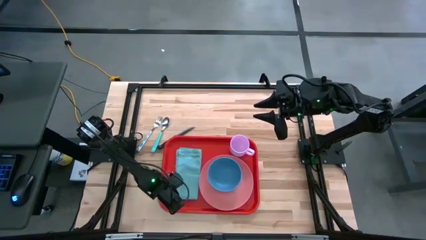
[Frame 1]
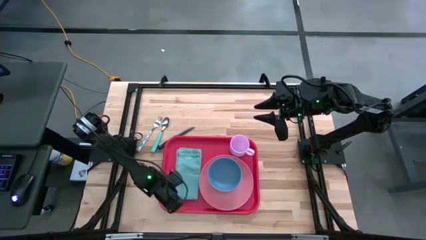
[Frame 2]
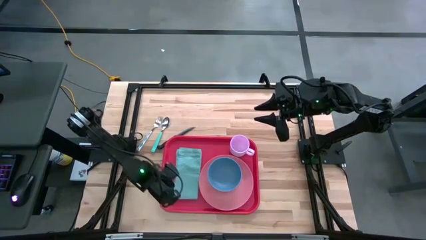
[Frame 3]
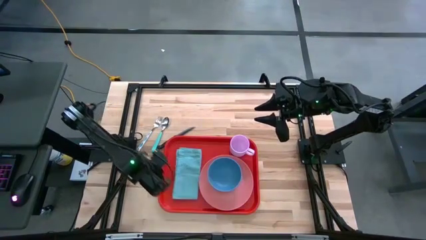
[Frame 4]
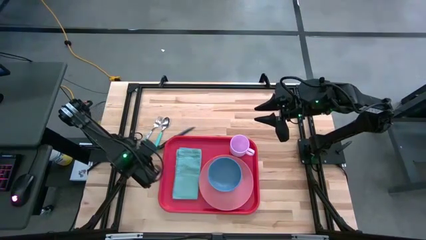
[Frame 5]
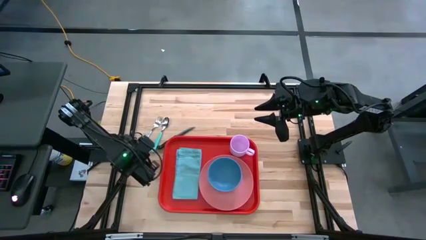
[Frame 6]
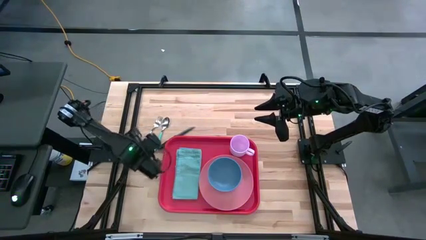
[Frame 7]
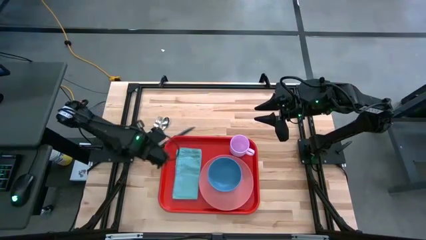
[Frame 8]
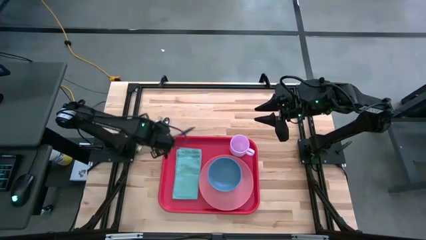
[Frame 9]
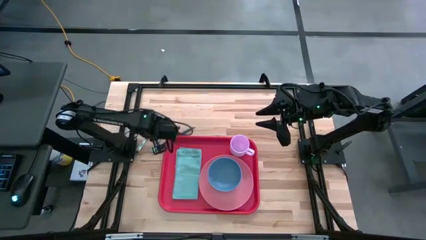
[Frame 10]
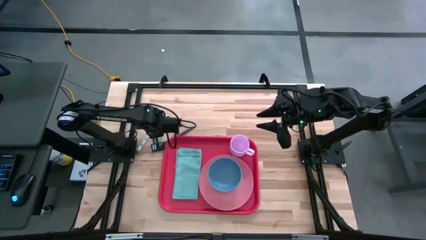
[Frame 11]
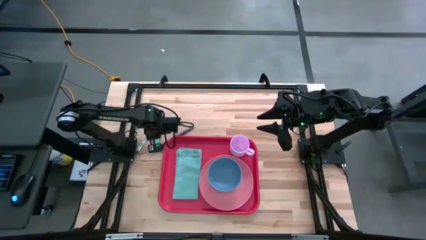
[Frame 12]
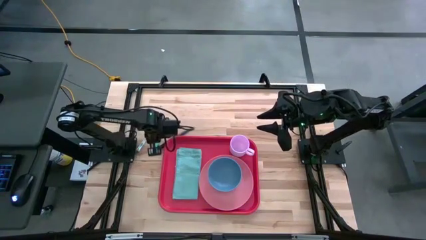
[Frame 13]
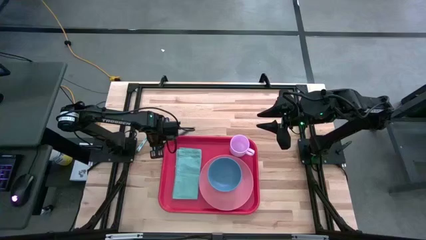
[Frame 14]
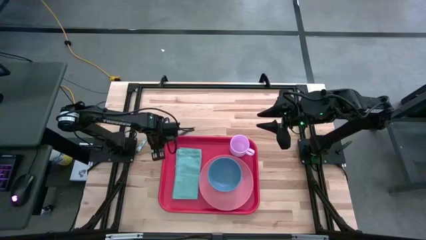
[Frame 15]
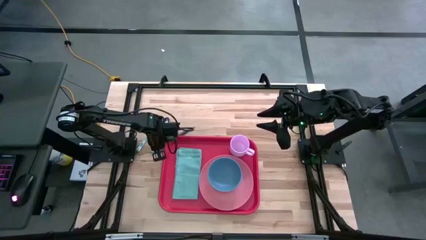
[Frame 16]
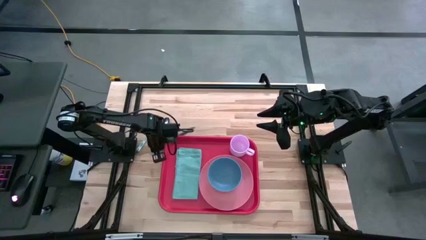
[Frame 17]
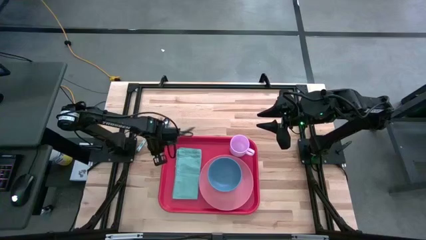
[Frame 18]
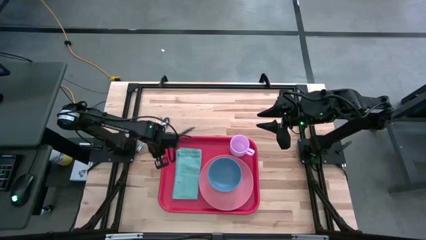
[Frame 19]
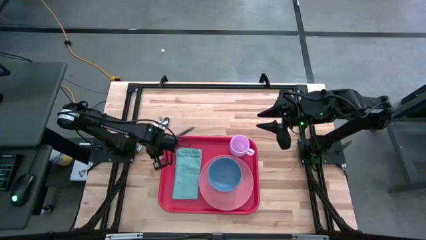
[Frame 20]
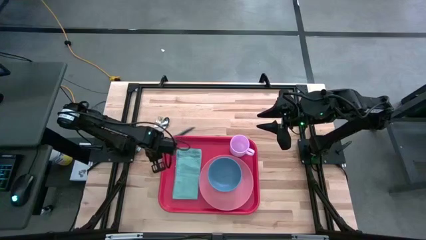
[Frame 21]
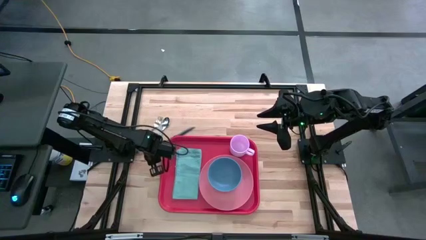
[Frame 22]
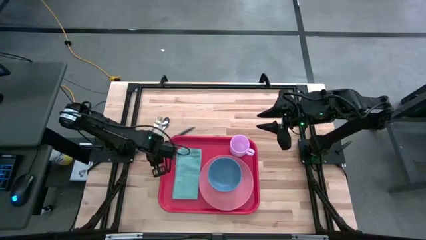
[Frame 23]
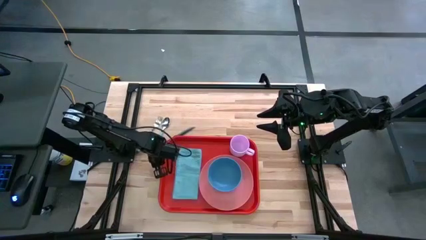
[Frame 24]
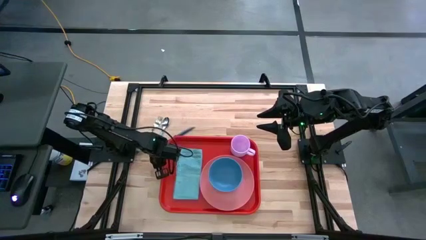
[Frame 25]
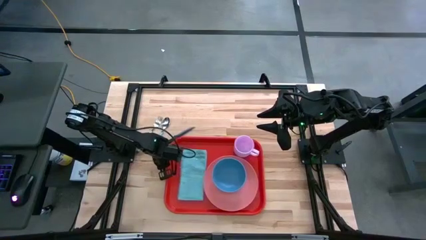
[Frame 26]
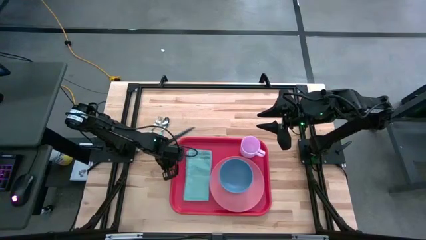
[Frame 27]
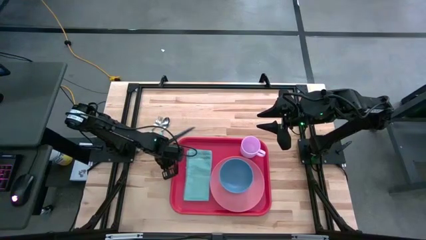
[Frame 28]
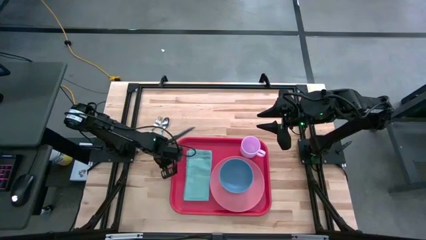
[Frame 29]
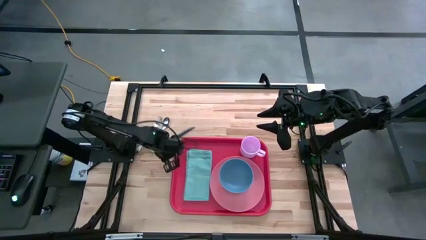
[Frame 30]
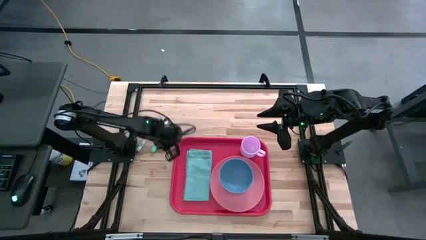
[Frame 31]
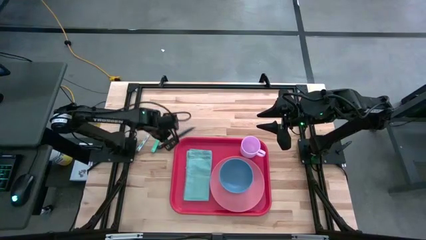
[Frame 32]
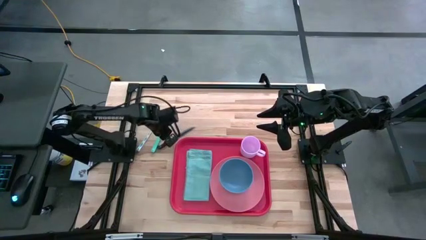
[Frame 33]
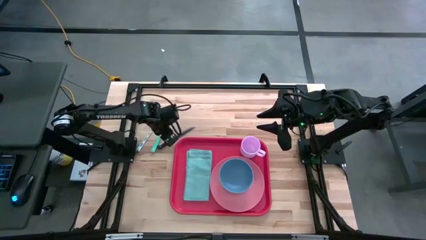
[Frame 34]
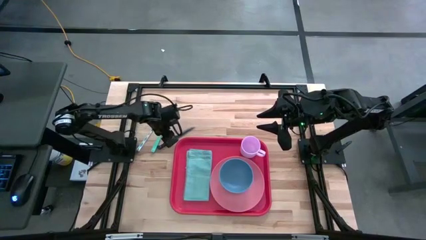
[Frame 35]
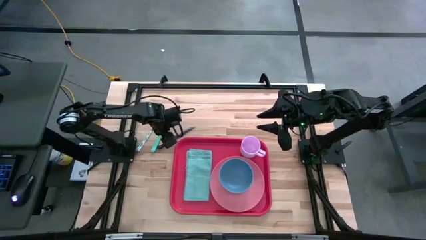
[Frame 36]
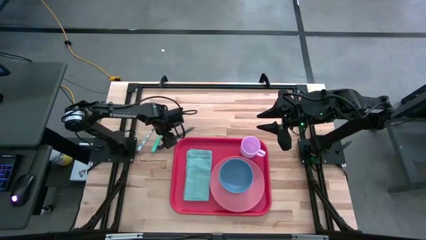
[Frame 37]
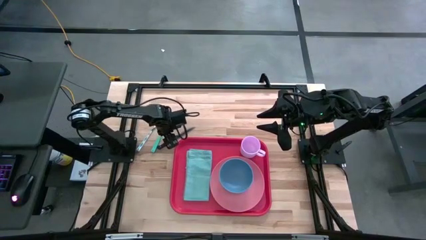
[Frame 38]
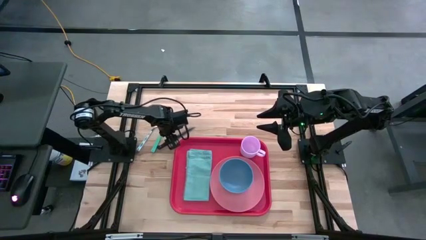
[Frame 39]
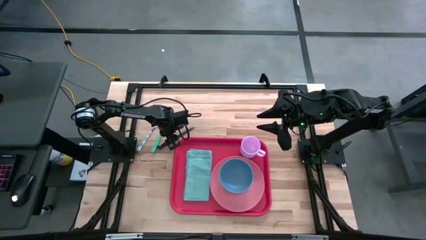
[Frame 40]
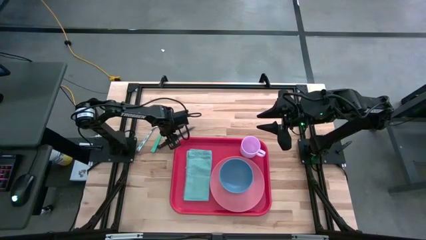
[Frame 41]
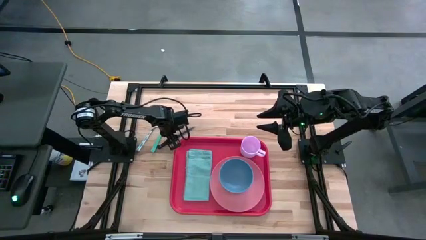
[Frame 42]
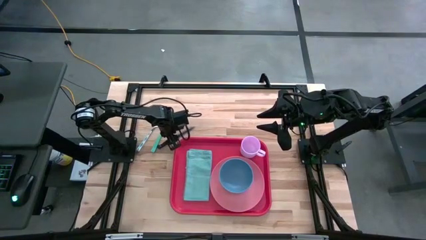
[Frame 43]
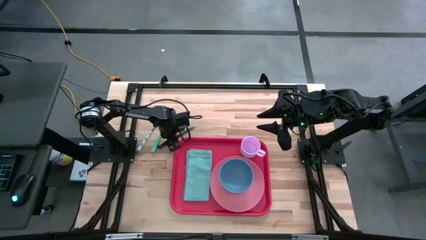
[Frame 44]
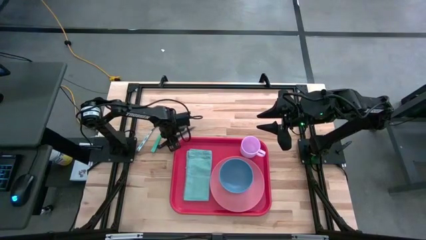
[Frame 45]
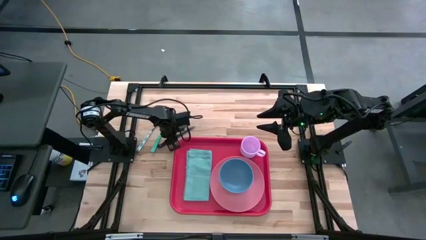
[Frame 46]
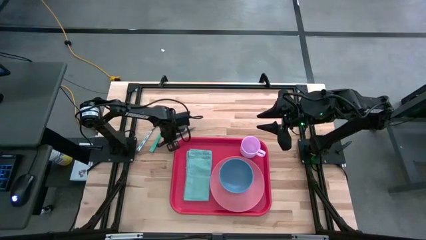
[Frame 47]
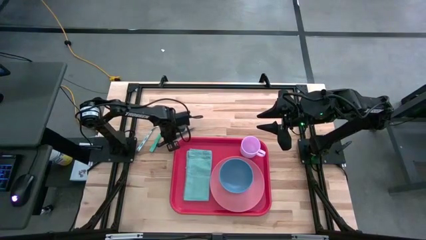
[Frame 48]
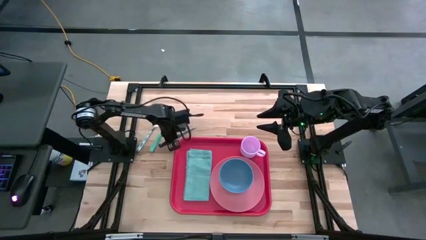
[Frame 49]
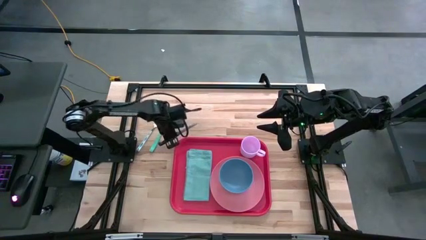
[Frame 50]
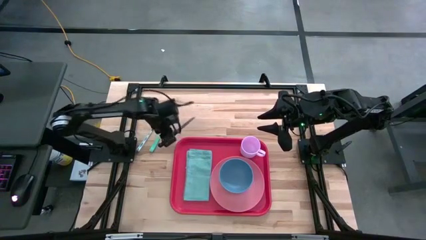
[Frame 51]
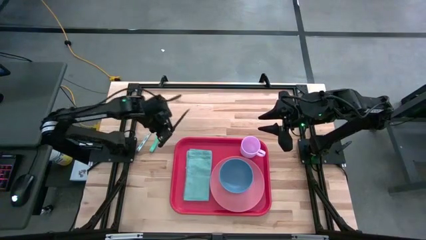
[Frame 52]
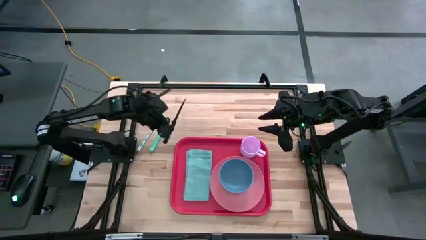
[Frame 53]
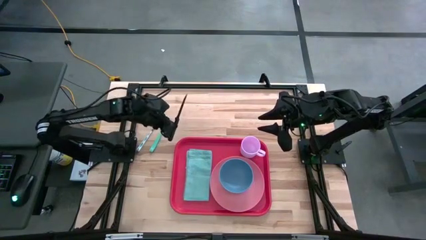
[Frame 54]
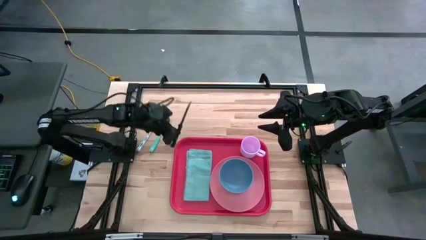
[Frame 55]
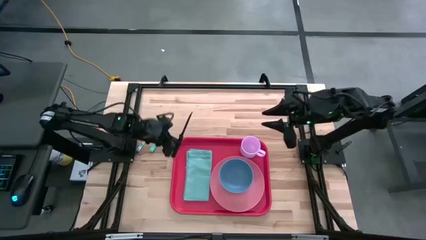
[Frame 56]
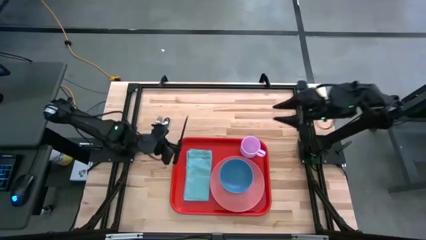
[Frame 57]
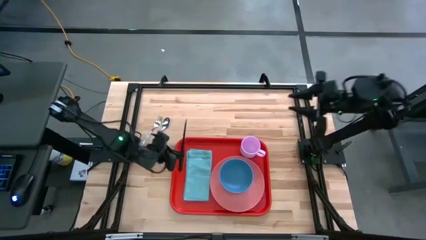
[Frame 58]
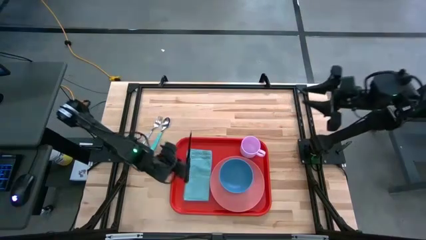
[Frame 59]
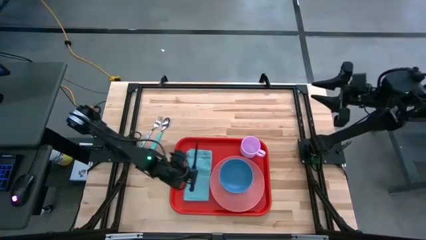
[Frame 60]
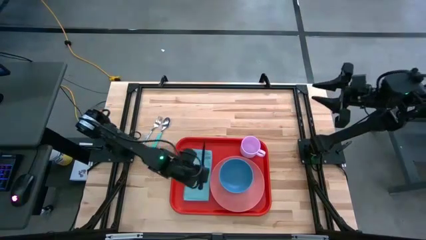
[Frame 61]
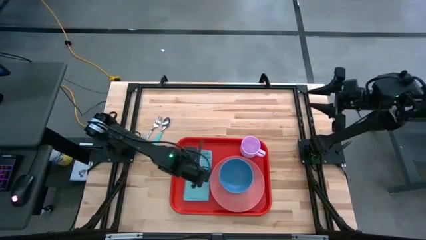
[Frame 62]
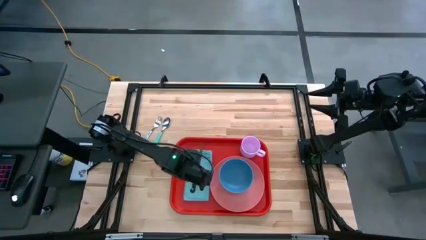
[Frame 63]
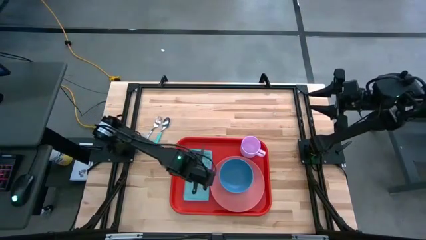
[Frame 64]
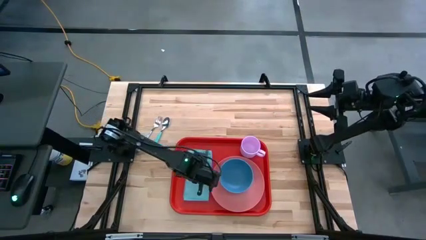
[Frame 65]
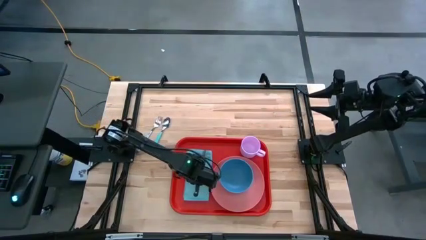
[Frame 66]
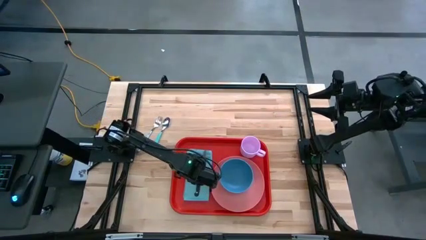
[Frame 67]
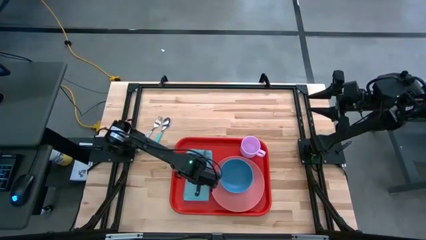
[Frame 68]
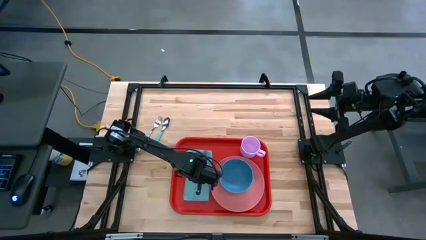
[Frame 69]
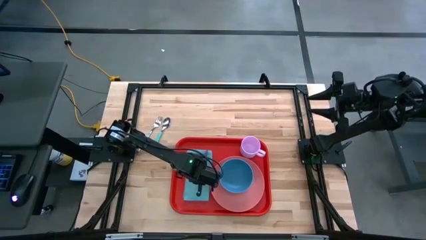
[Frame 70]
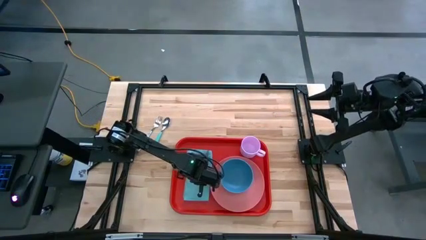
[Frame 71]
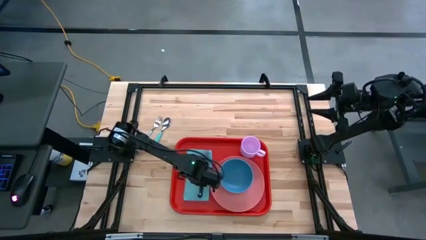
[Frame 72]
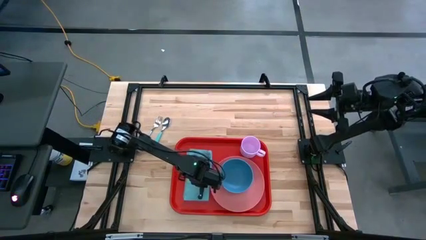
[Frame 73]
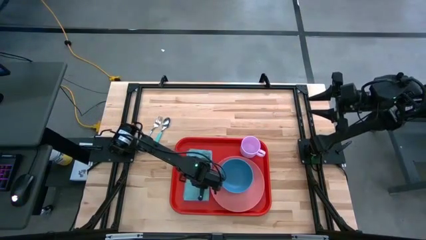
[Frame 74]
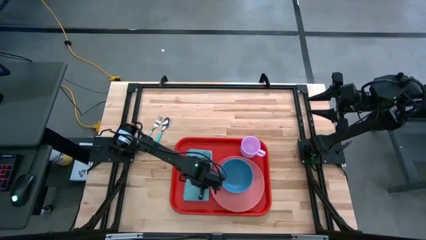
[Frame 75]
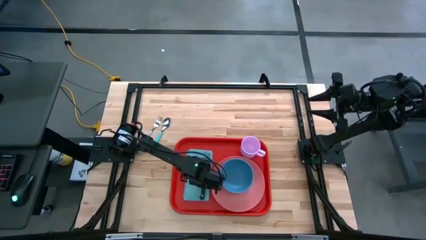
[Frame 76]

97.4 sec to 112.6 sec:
Task: Set up tray
Put the knife into the blue napkin
